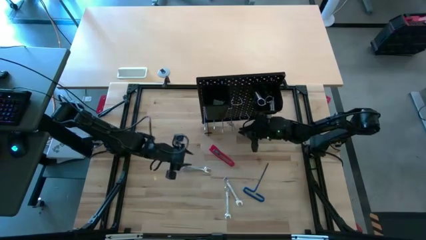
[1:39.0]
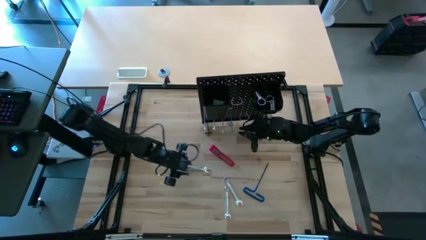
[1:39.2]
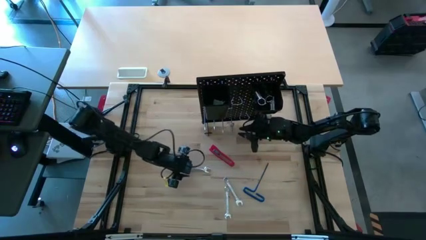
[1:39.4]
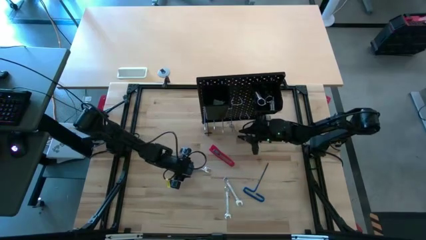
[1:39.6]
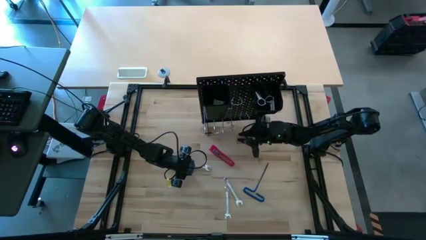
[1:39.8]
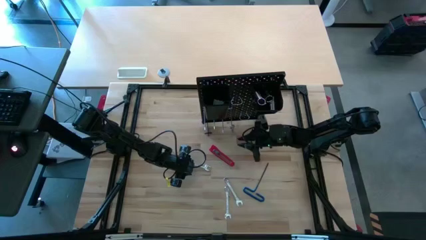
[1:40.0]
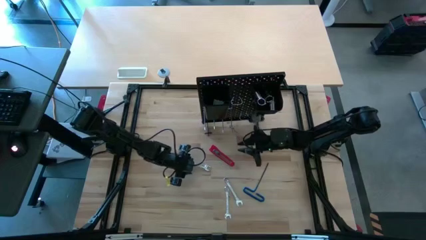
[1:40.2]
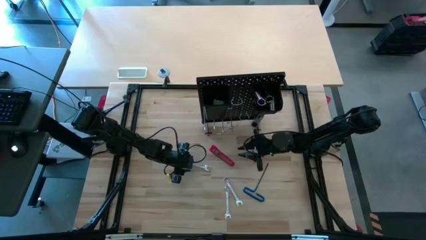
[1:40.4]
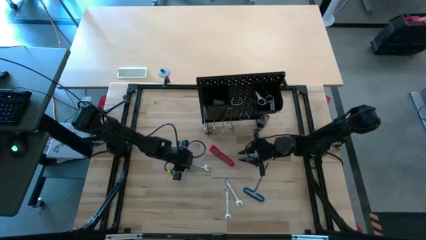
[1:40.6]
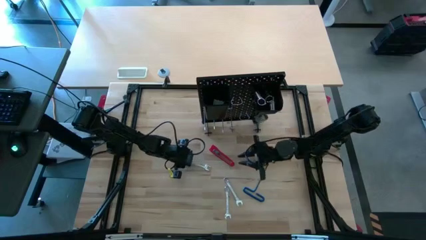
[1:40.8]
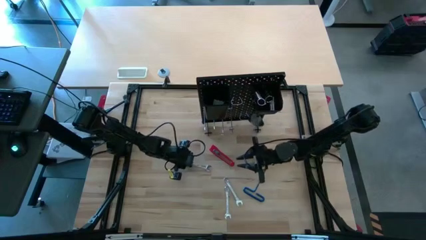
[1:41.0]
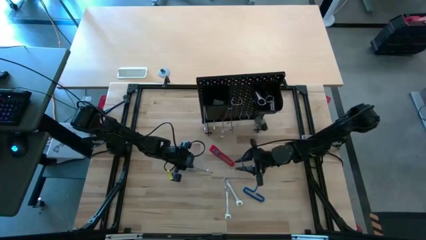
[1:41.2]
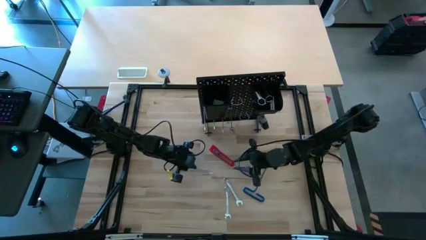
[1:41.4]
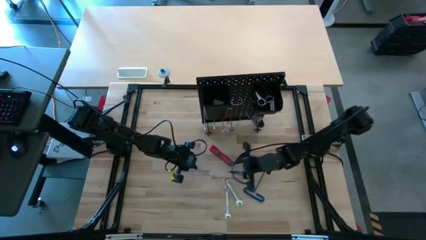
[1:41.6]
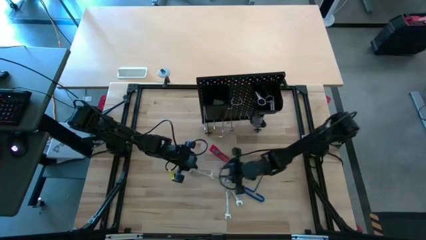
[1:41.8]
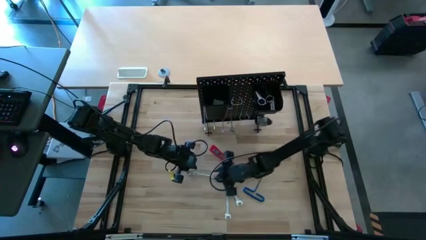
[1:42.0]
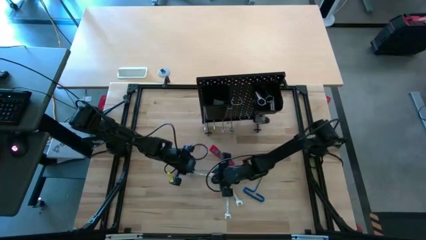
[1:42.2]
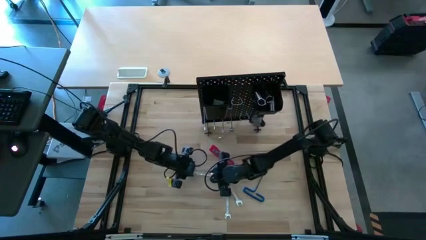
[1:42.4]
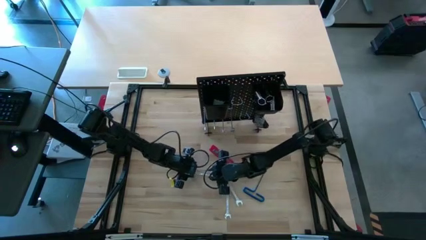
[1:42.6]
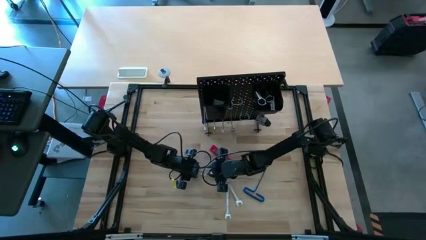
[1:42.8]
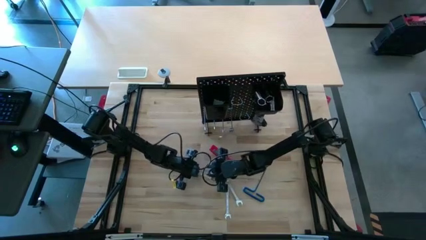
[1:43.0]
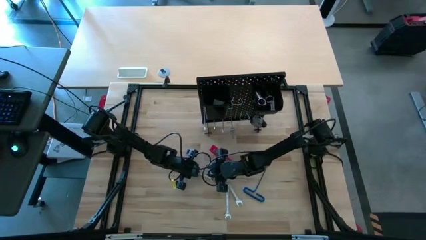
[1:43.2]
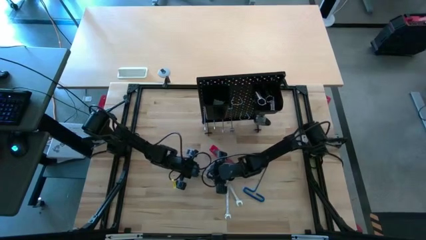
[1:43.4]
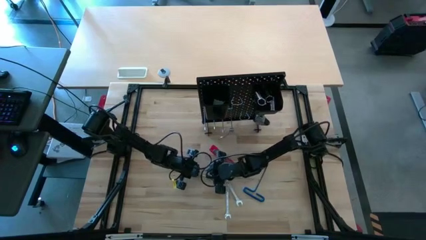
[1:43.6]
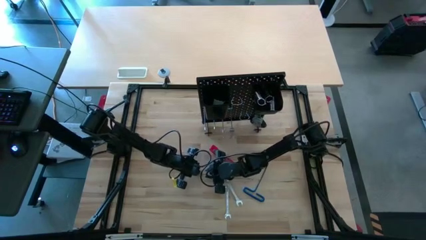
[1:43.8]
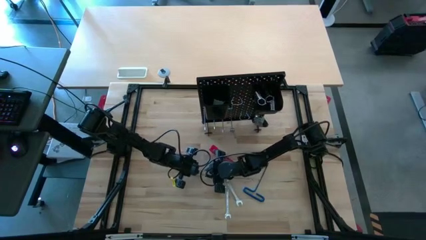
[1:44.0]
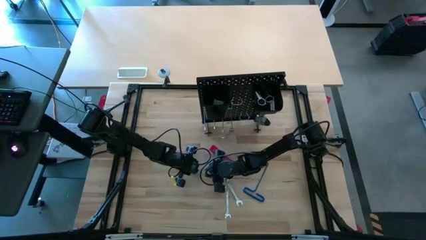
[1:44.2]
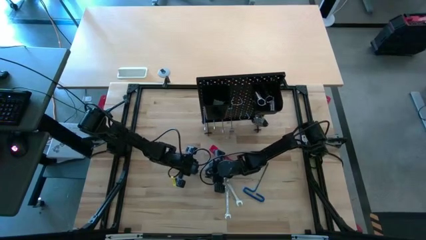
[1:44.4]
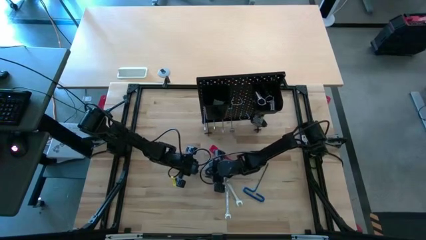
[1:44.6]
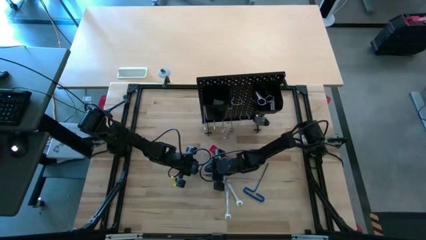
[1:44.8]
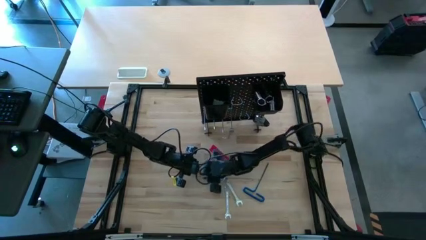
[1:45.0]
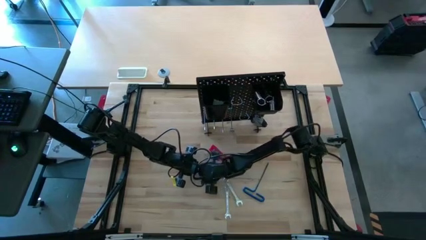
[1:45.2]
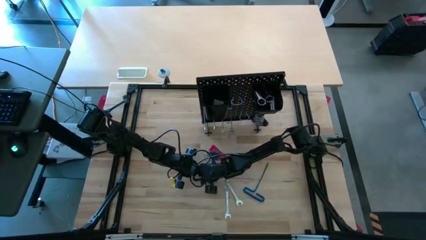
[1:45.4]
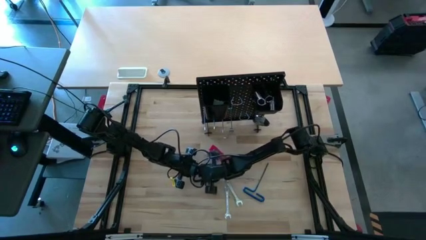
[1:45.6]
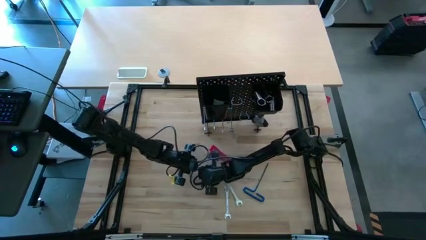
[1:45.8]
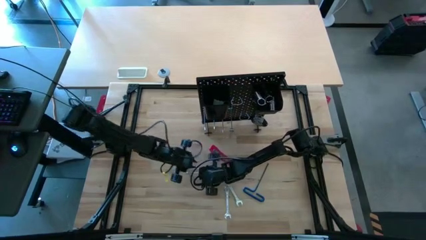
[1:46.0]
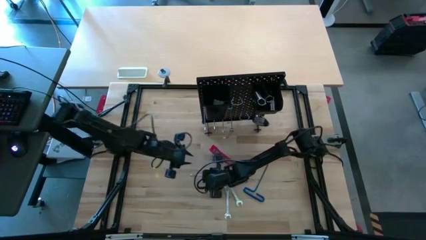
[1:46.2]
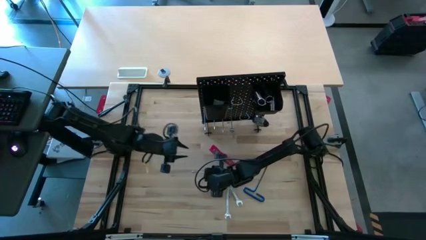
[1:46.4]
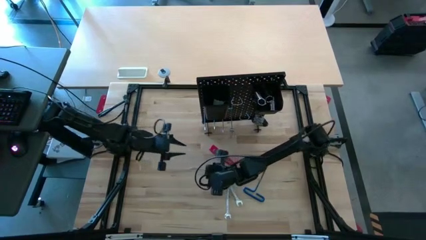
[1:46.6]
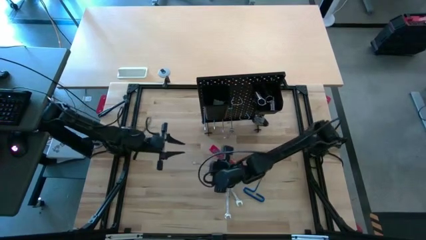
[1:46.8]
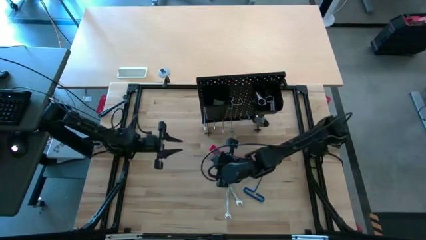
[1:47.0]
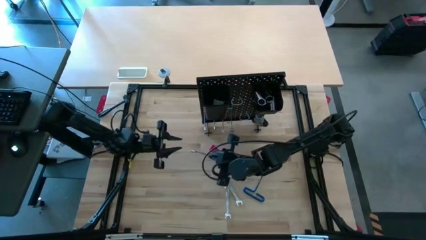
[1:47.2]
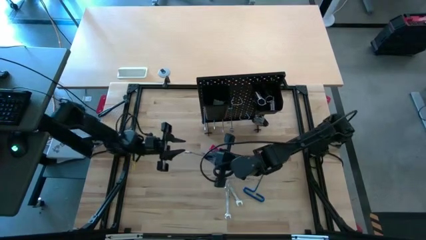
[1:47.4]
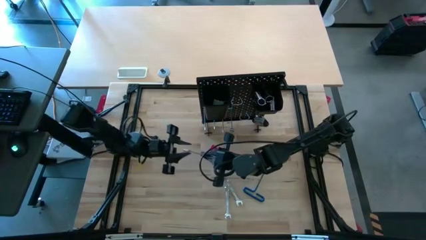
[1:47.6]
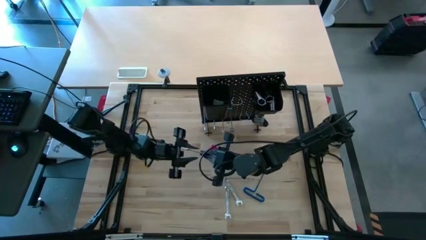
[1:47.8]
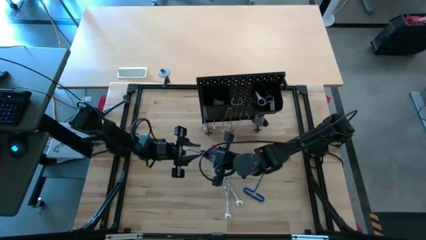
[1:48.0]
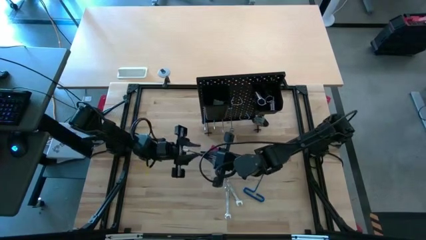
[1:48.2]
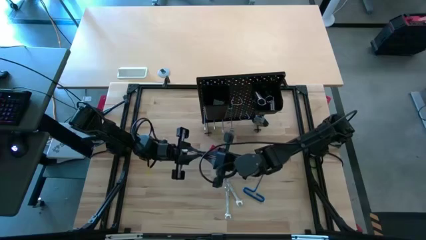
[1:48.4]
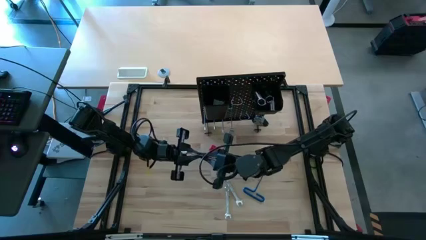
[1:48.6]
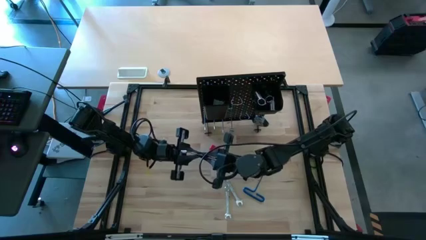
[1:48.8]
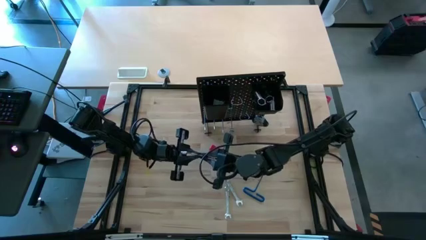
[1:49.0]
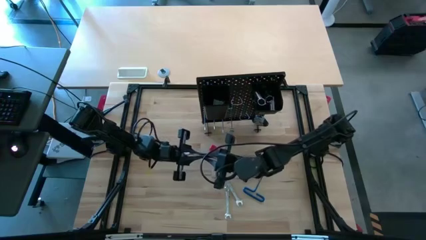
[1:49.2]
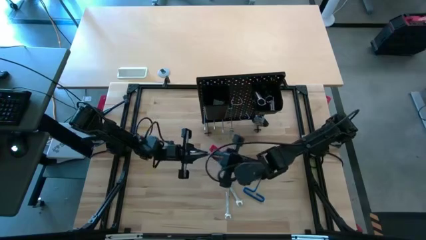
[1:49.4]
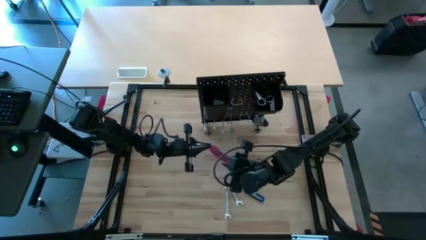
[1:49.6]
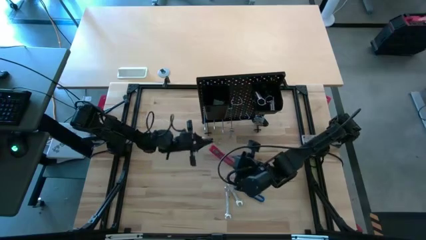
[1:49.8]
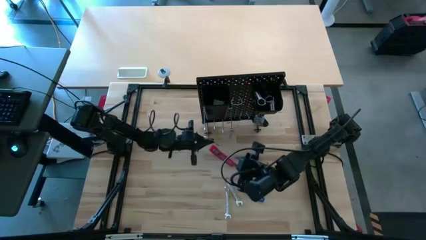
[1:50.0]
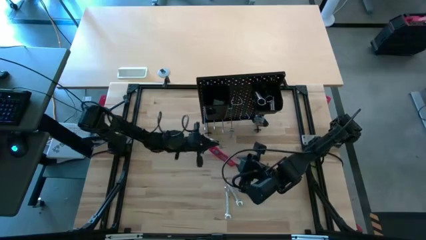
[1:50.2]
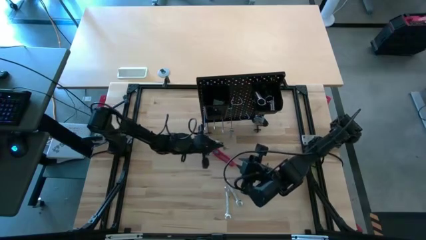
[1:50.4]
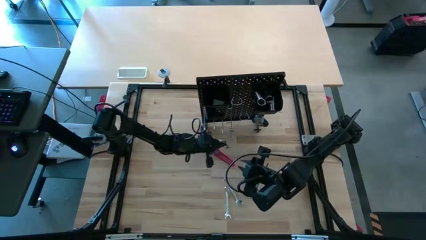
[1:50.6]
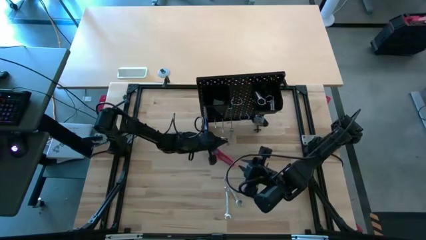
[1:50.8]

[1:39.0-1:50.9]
Task: Hang tools onto peg board
Hang the wrench on the peg board

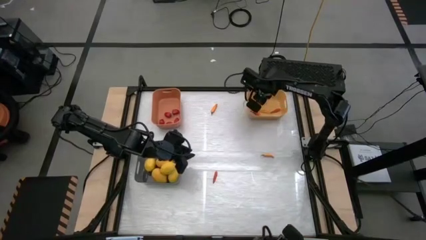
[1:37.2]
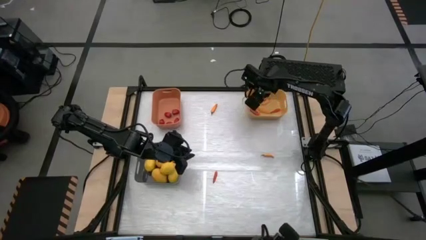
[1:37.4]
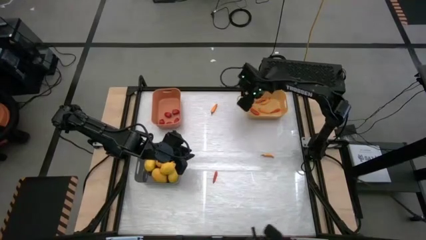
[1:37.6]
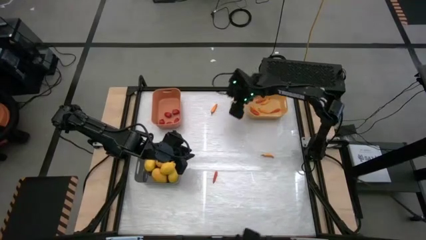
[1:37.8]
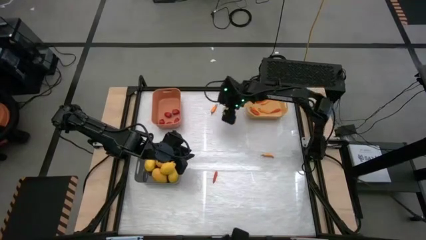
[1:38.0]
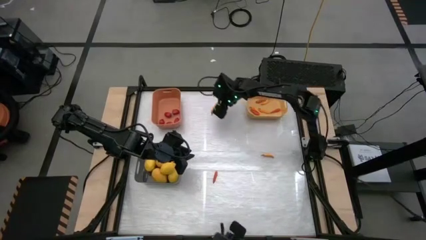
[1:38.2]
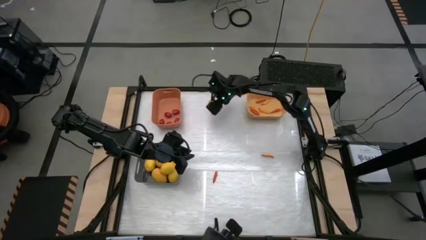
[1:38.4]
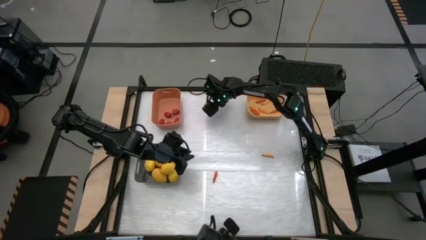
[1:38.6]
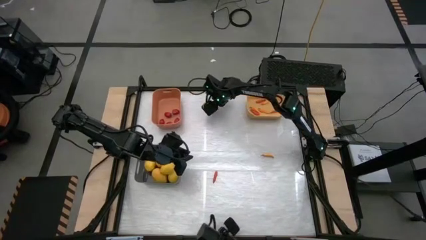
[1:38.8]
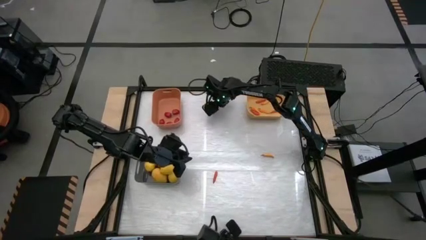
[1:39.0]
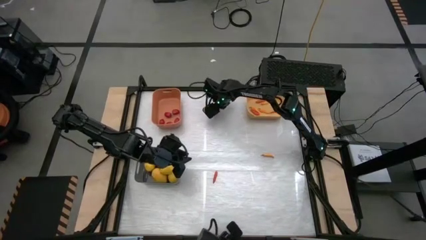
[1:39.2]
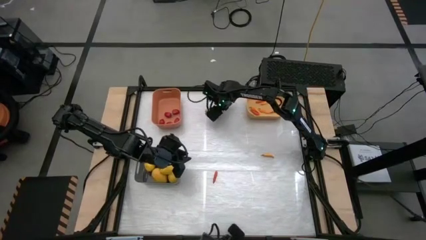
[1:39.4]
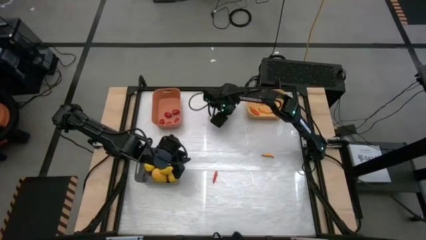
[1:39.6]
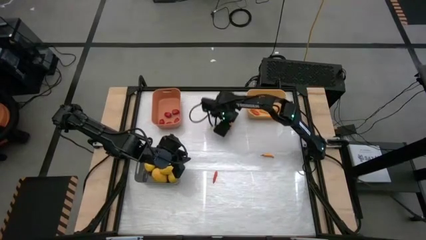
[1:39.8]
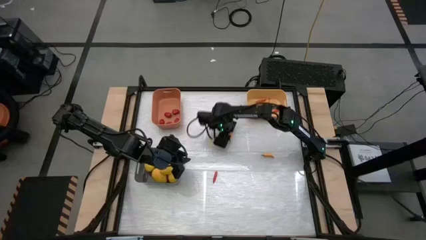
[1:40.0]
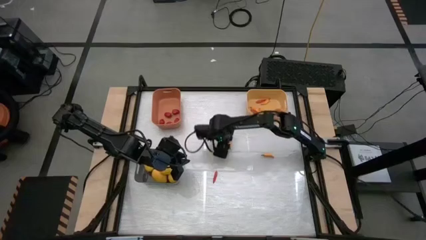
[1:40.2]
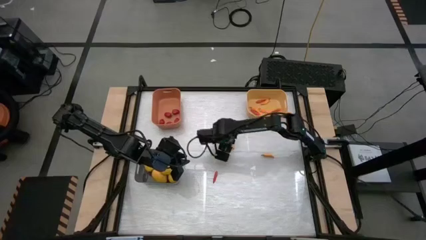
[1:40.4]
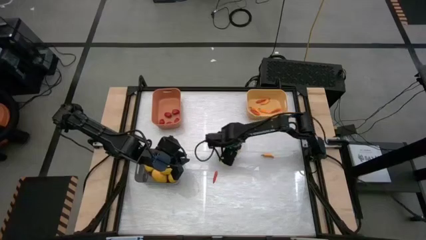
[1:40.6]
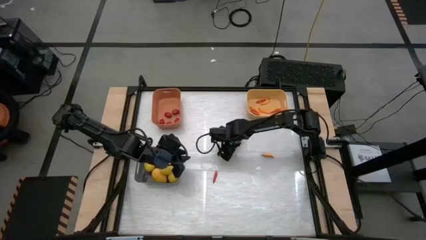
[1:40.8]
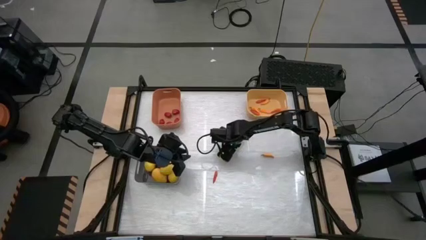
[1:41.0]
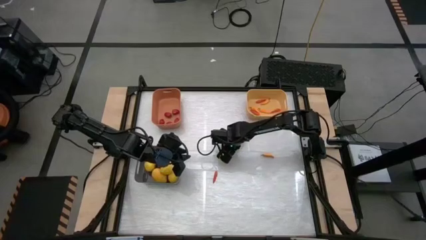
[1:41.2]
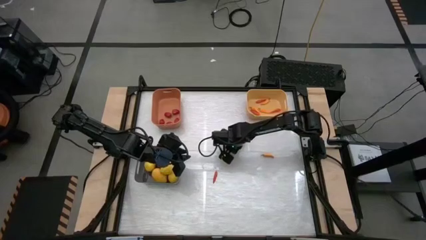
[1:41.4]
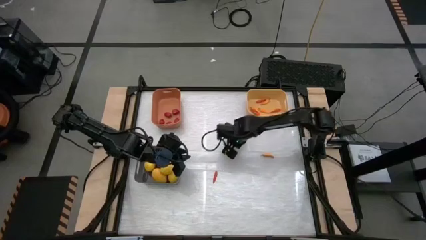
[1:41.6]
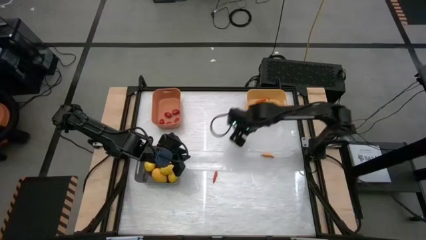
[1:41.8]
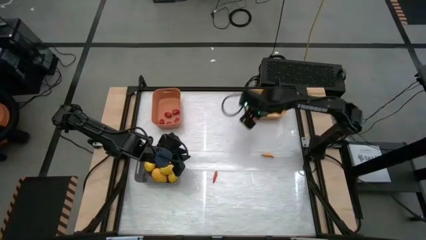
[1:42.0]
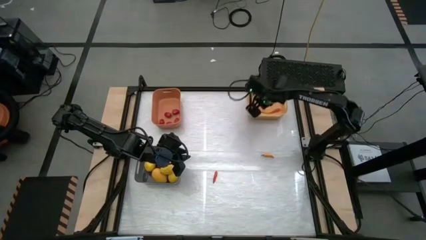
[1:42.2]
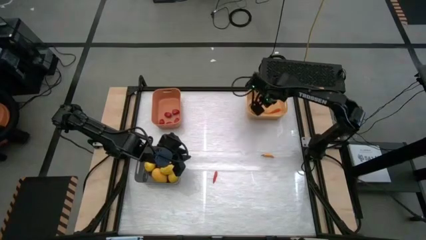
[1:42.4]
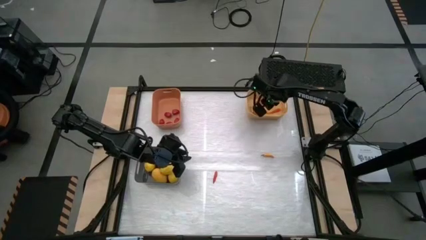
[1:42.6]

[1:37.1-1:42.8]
Task: Sort produce into baskets
Put the yellow chili pepper into the yellow bin
